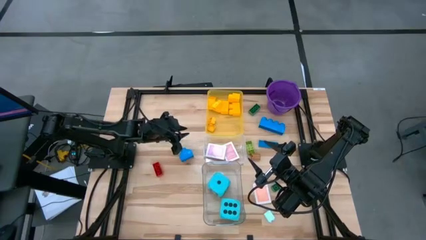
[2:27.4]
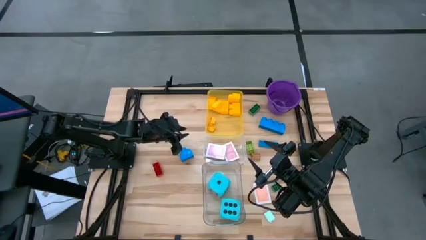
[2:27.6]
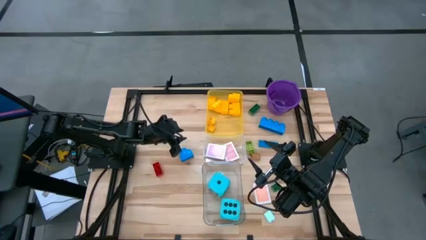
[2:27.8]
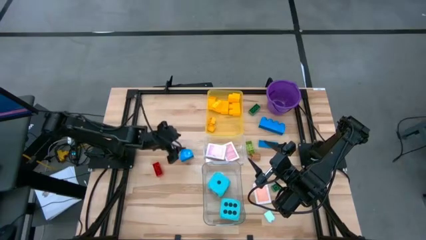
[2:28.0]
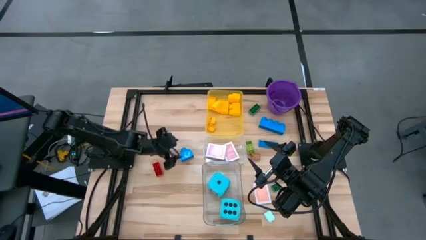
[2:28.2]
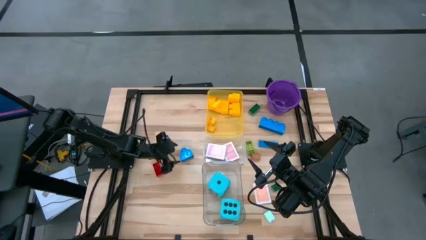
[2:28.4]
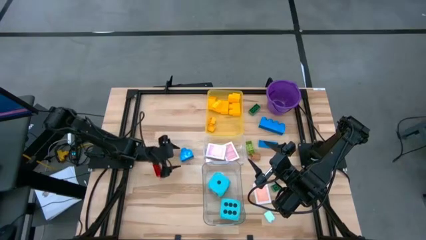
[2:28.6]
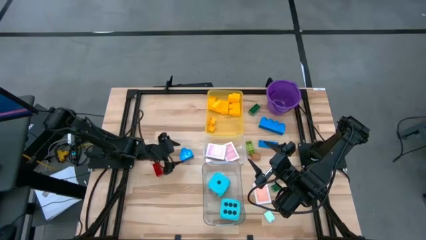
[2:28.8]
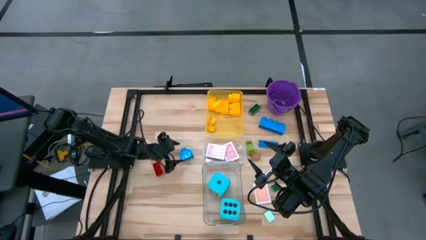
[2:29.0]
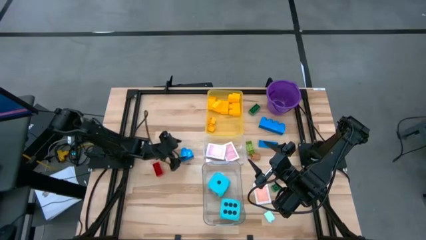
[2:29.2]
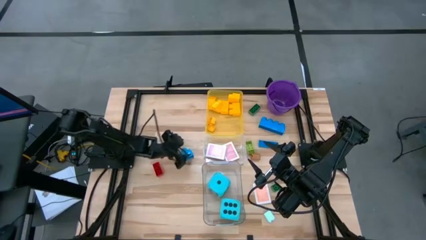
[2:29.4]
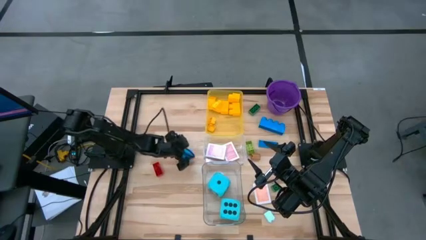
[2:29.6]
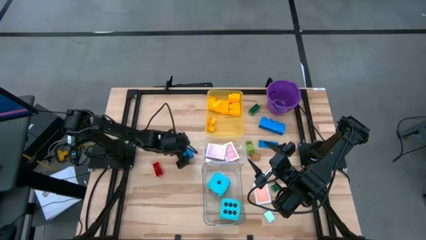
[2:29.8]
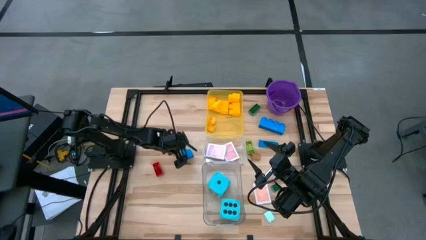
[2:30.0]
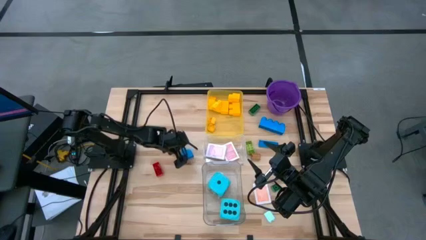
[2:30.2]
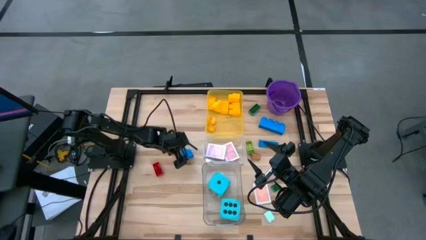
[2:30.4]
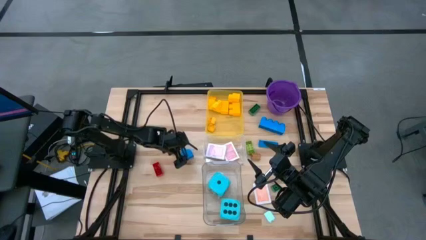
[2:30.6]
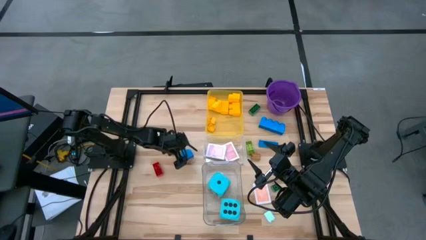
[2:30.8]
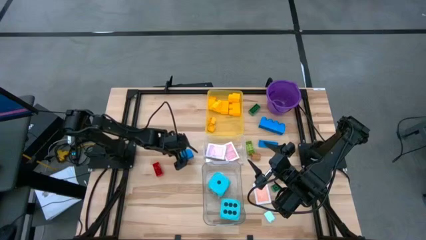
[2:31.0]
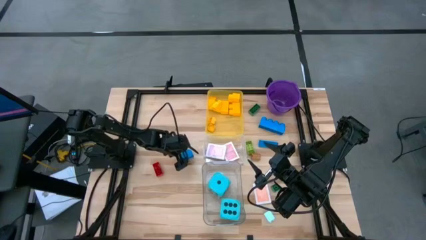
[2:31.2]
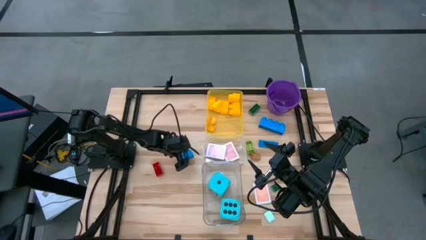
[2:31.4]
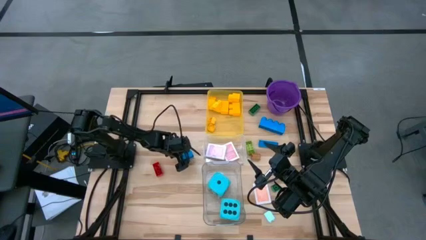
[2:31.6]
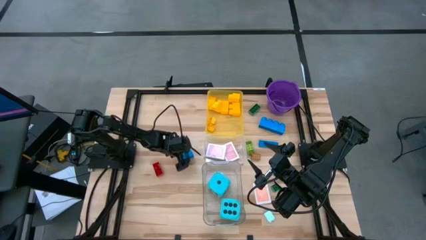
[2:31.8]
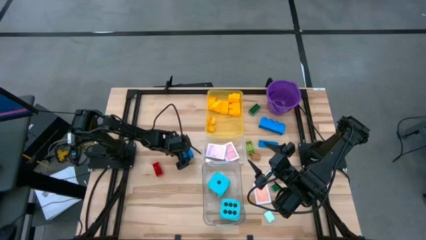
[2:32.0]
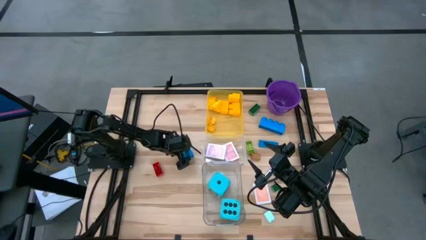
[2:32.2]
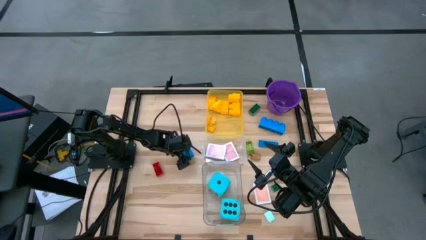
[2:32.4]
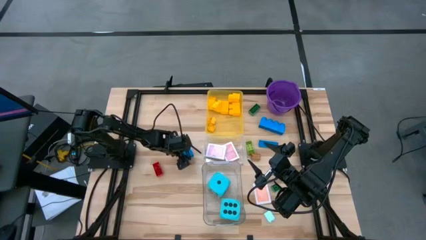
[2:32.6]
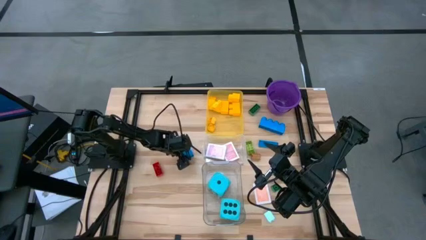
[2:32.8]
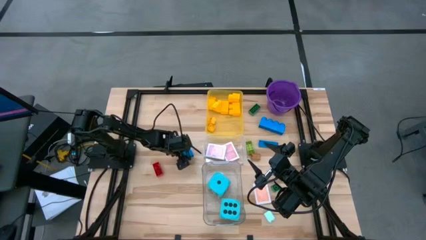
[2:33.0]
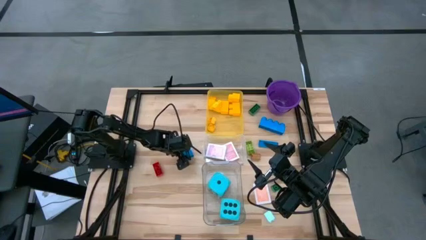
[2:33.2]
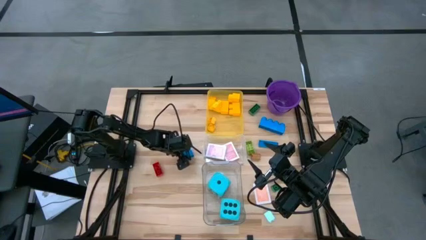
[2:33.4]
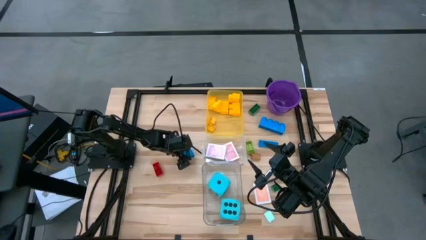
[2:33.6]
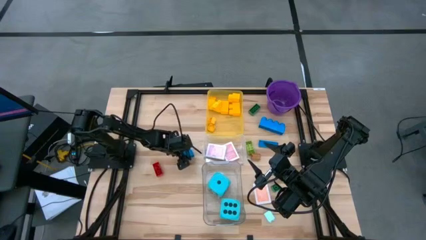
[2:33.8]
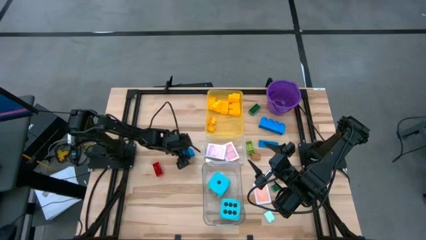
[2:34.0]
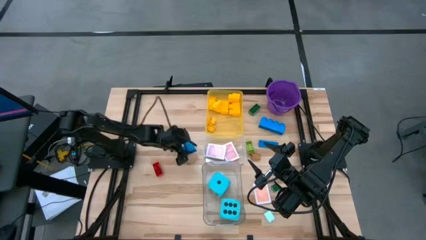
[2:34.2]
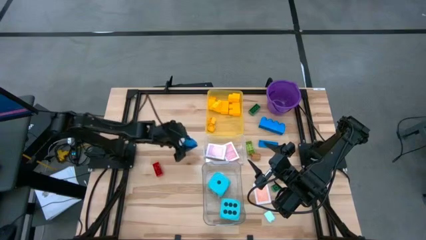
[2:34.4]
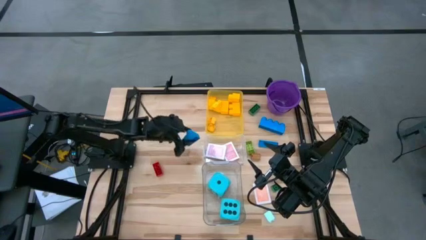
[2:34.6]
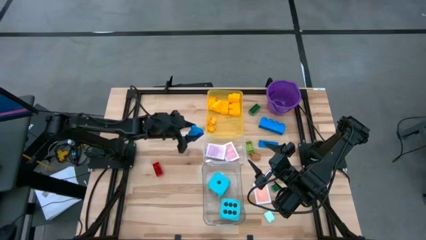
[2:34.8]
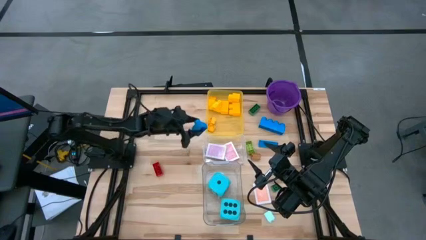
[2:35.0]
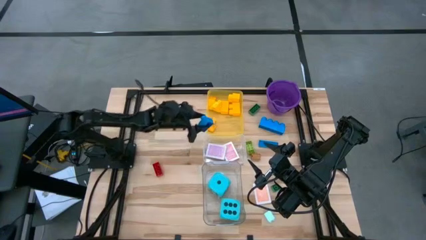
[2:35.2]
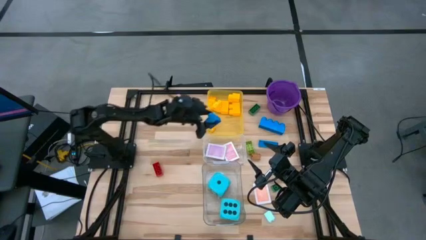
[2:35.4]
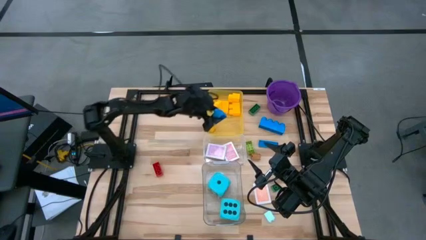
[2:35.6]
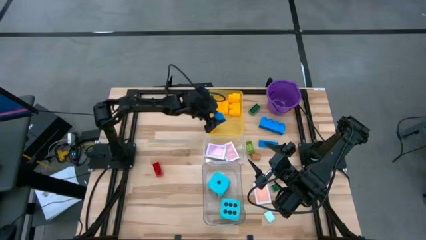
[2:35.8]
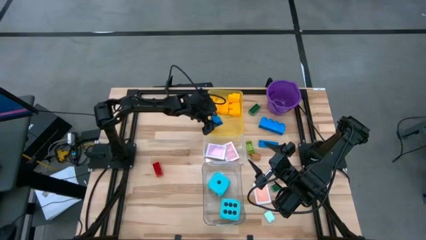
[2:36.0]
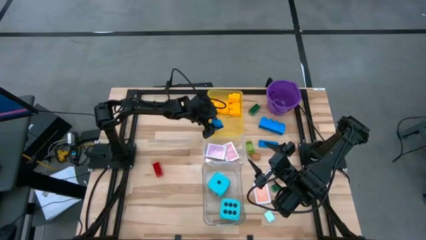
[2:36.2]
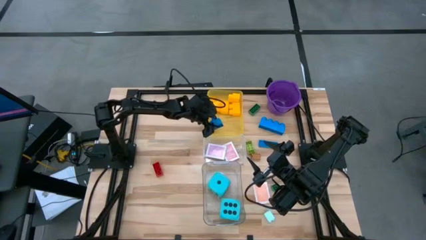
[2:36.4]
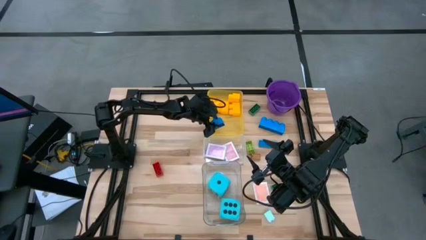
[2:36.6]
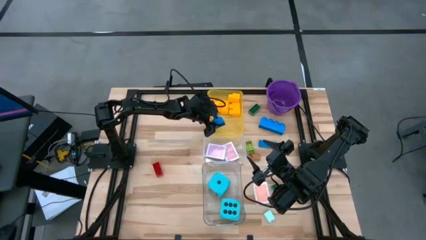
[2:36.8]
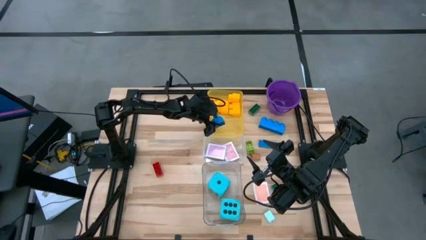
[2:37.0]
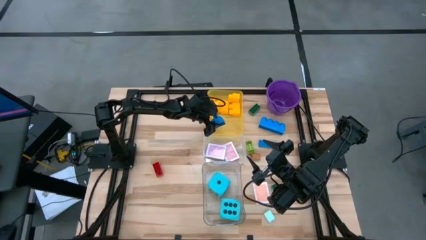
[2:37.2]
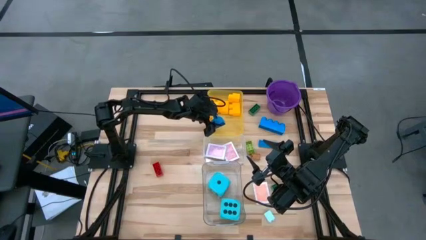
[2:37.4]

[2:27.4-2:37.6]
Task: Pick & Place Toys
Put the blue game piece into the yellow bin

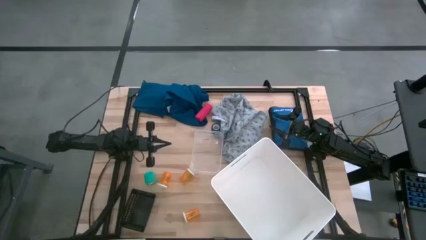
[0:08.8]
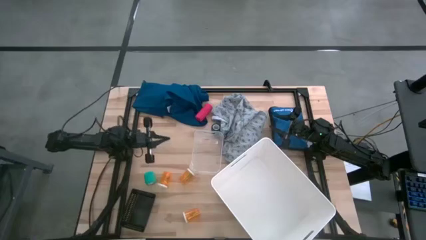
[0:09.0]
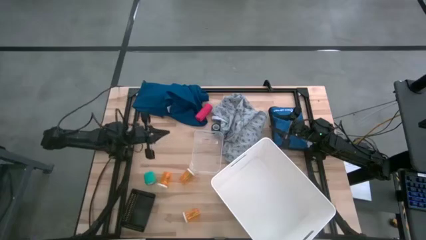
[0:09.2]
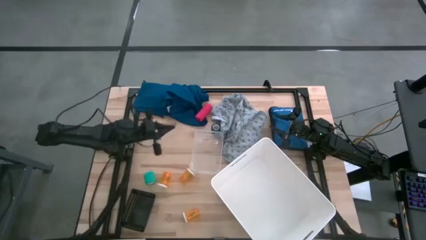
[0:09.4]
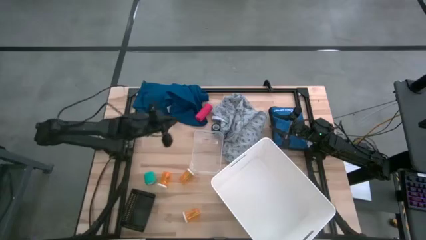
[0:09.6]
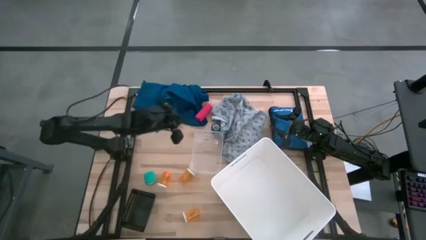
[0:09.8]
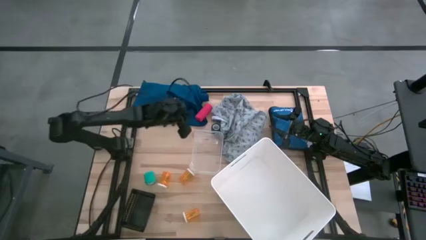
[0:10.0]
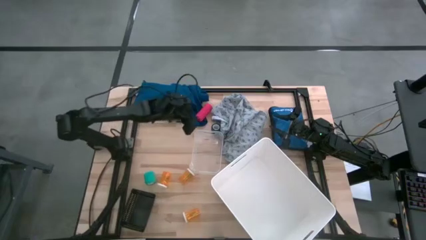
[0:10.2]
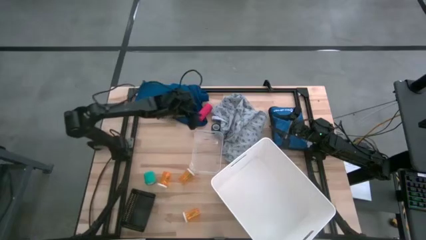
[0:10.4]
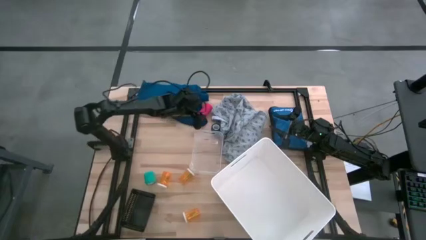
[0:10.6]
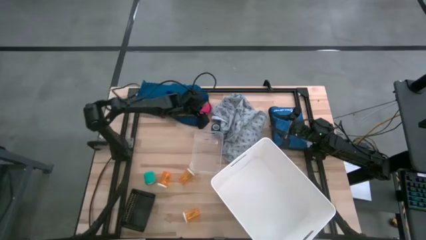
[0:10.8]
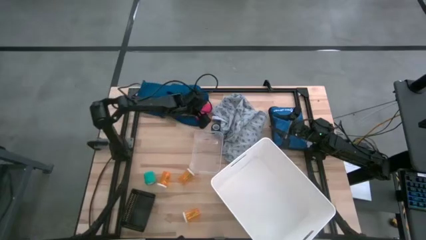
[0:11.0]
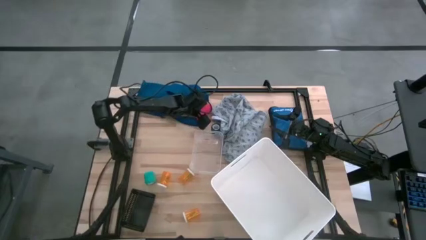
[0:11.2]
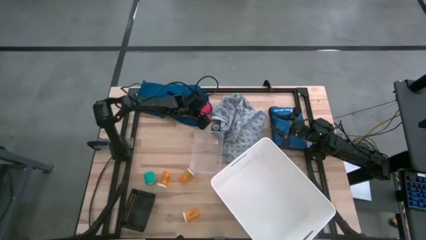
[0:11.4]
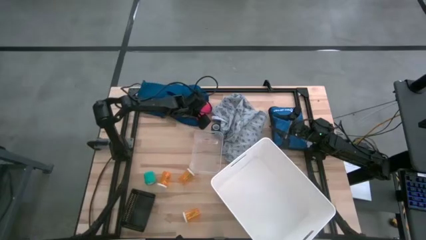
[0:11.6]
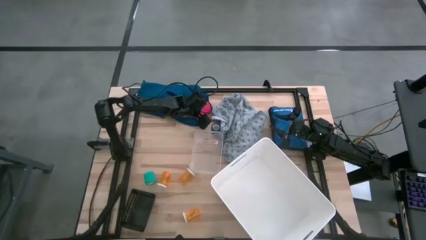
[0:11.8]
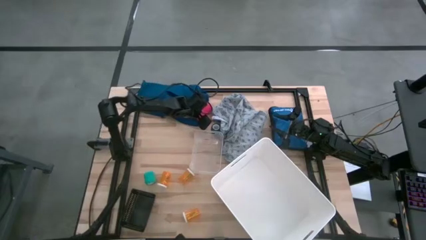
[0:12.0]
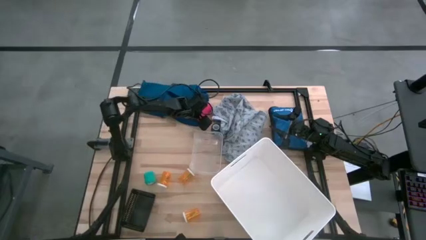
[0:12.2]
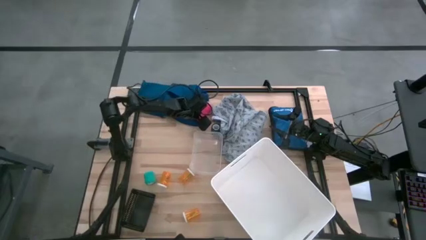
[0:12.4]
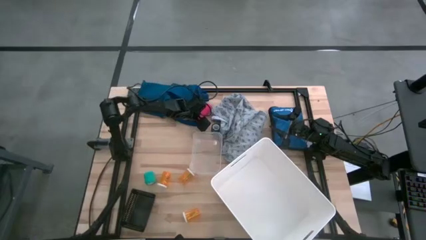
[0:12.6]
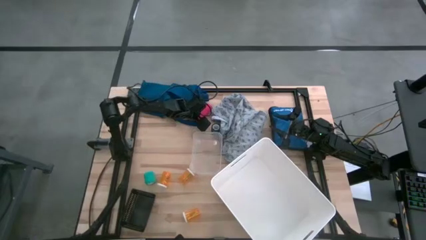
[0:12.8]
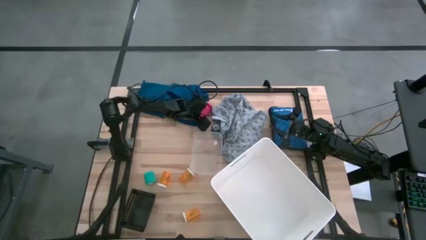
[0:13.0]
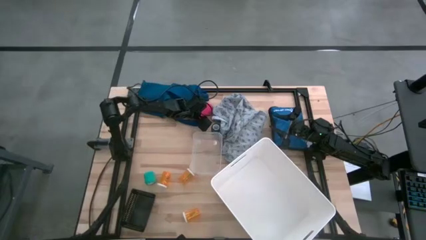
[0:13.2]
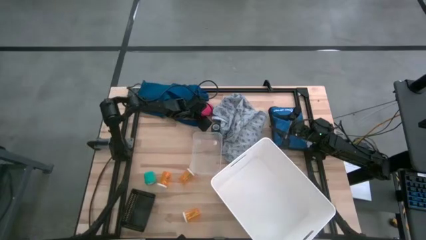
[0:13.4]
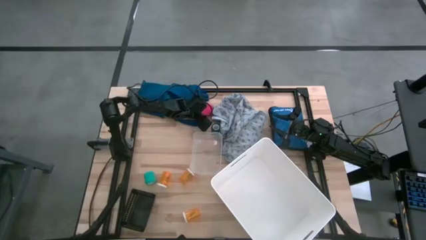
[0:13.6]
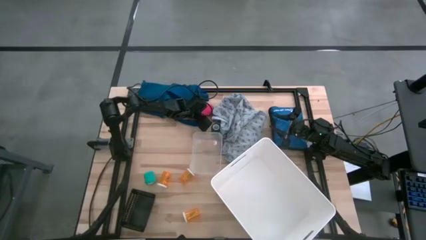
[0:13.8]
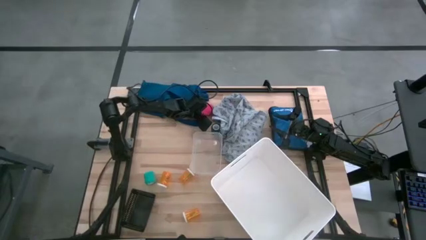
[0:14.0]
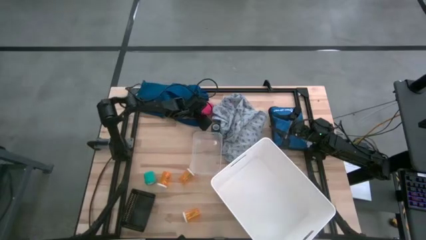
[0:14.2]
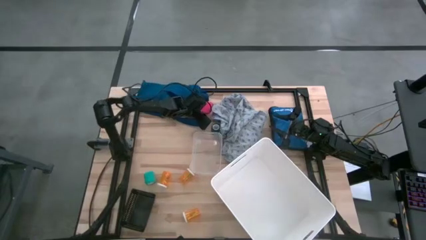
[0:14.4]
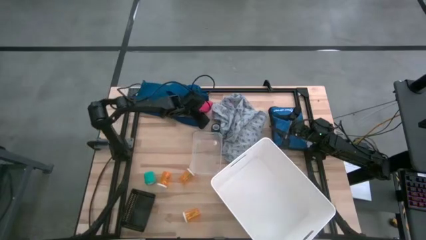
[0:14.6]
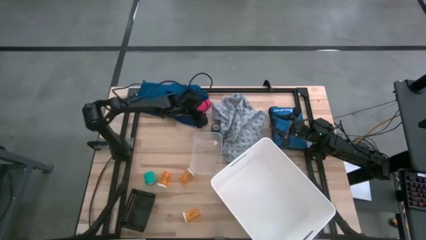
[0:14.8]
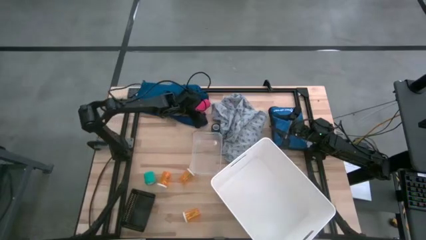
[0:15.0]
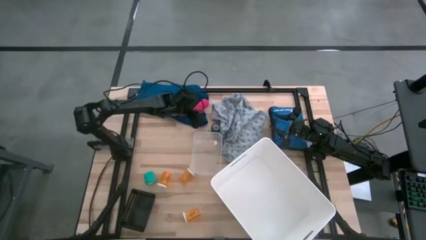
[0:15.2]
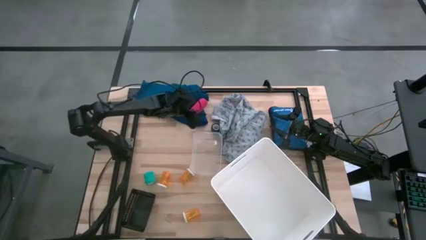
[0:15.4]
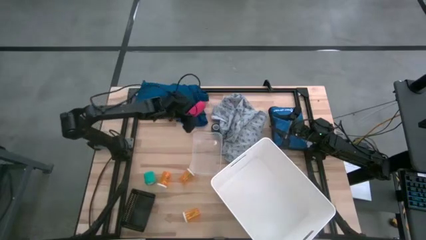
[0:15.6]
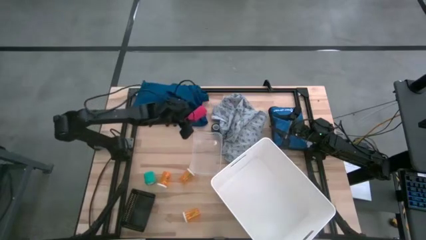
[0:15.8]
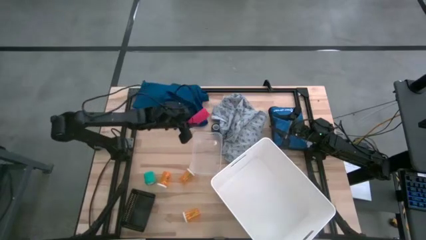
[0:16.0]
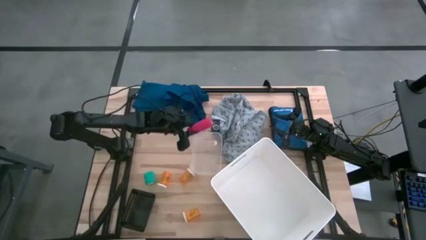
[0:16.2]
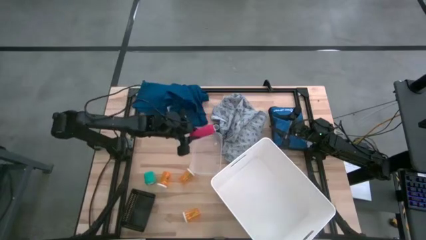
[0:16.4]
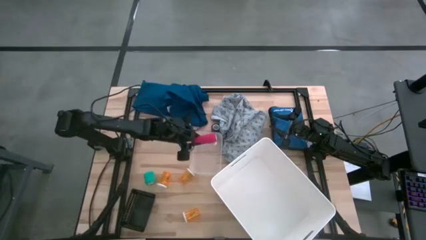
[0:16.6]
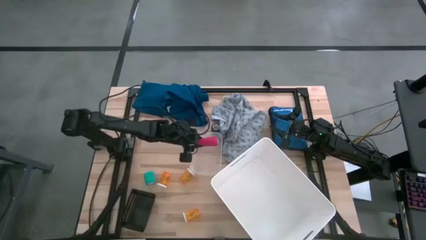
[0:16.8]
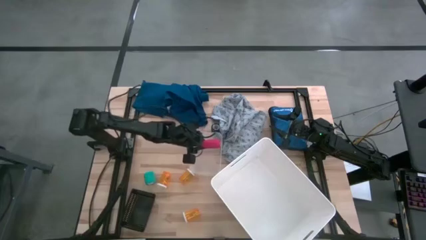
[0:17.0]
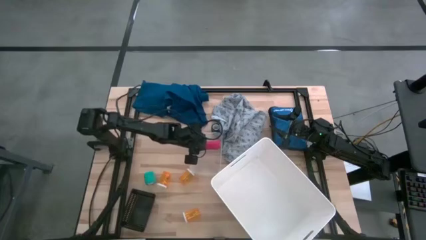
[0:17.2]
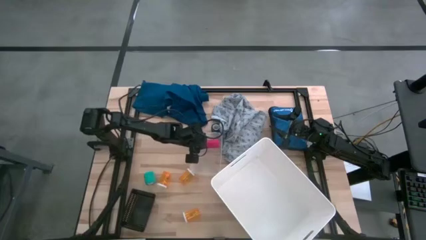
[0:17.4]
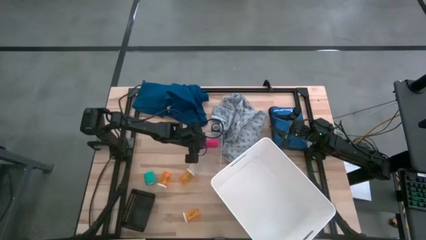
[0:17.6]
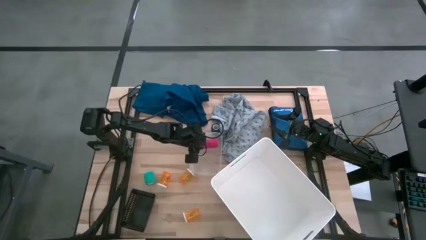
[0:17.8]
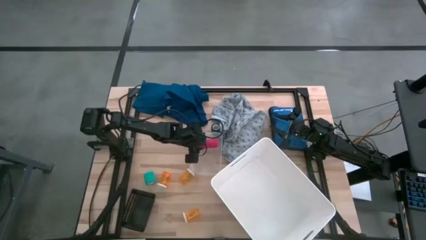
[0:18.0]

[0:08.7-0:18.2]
Task: Pick & Place Medicine items
Put the red bandage into the transparent bin
